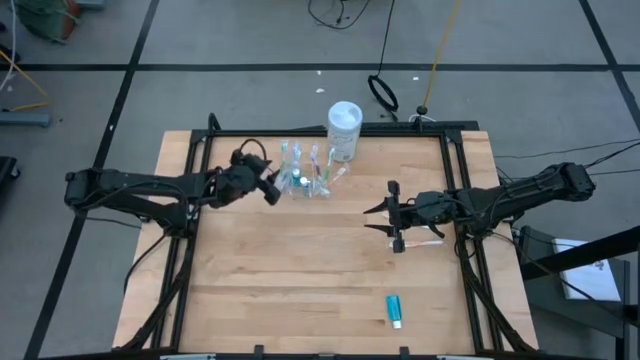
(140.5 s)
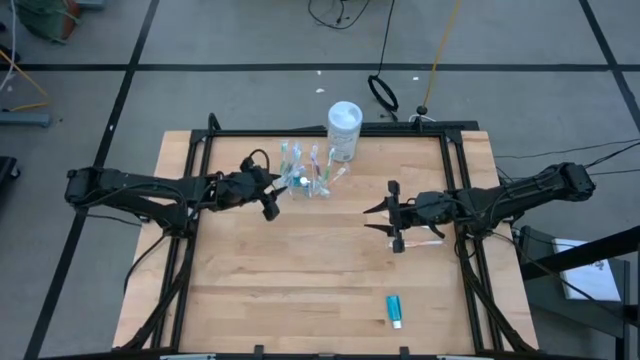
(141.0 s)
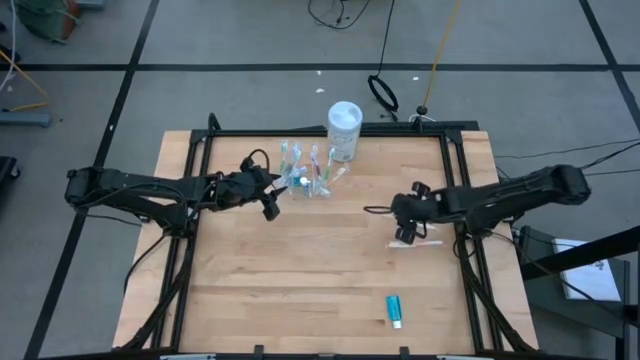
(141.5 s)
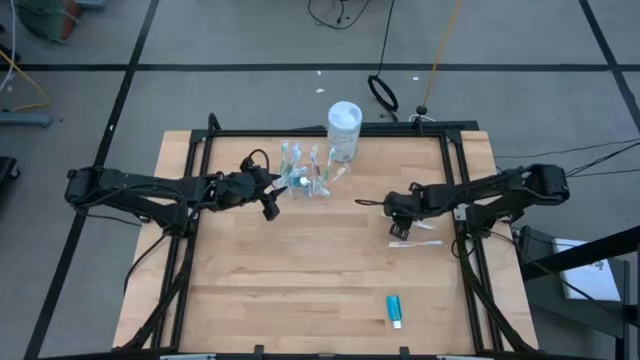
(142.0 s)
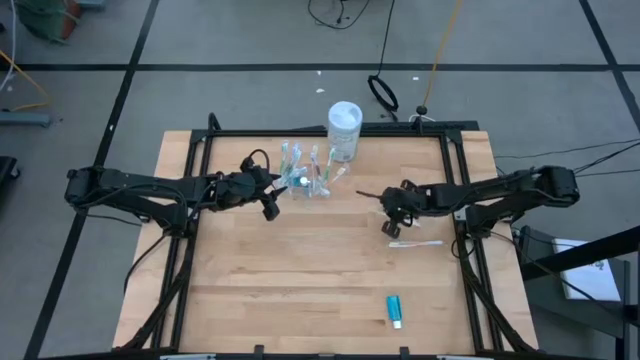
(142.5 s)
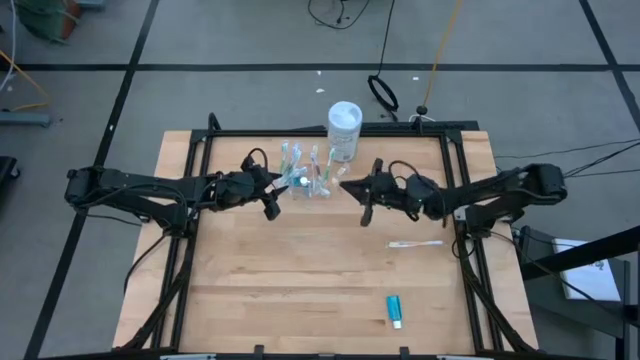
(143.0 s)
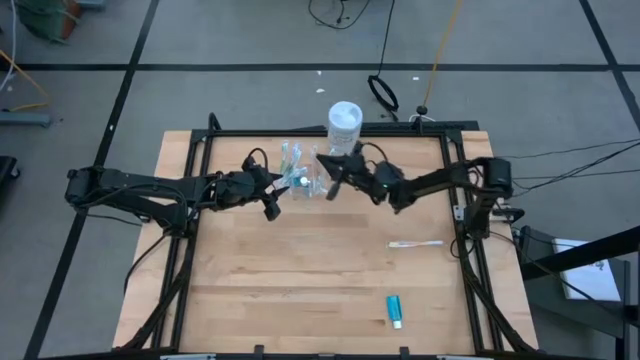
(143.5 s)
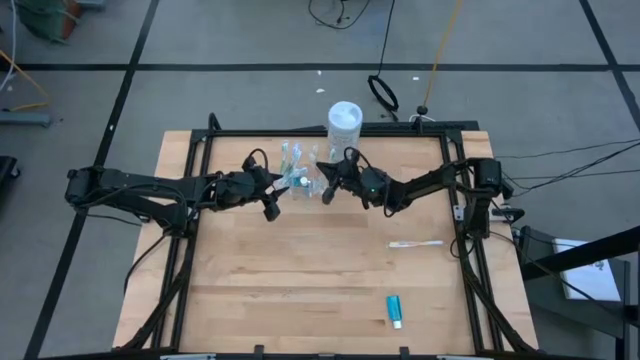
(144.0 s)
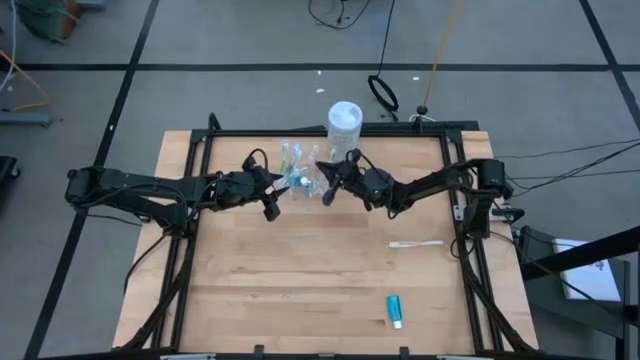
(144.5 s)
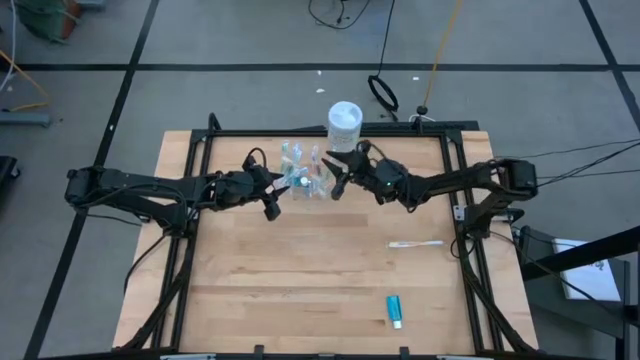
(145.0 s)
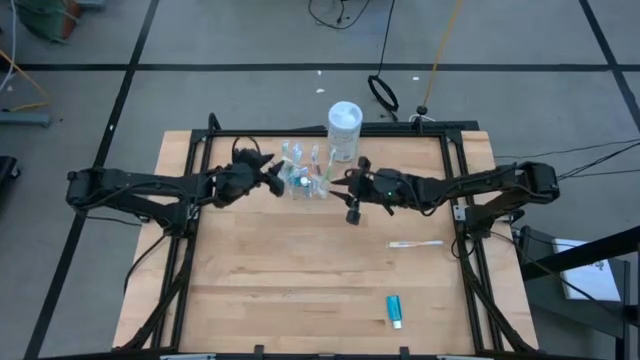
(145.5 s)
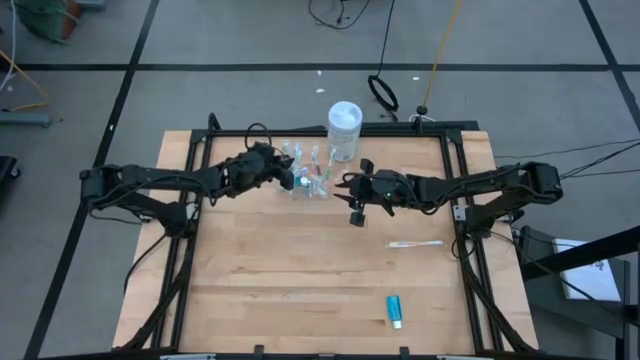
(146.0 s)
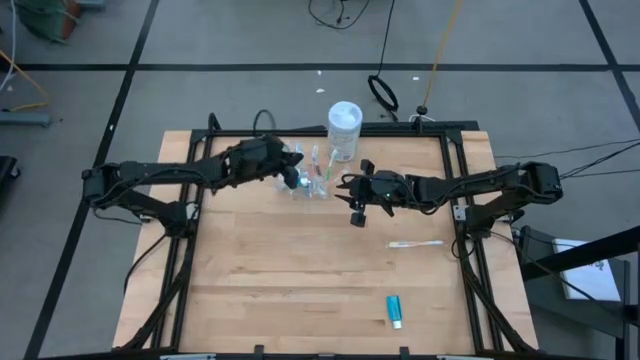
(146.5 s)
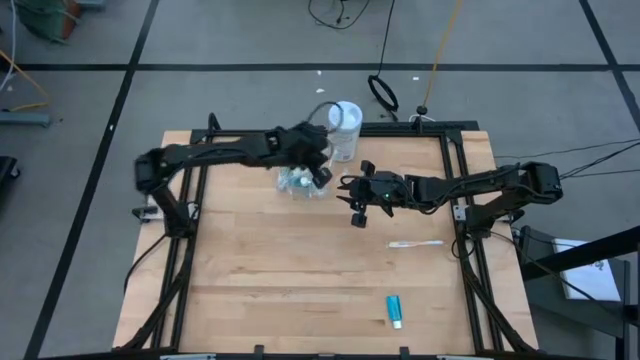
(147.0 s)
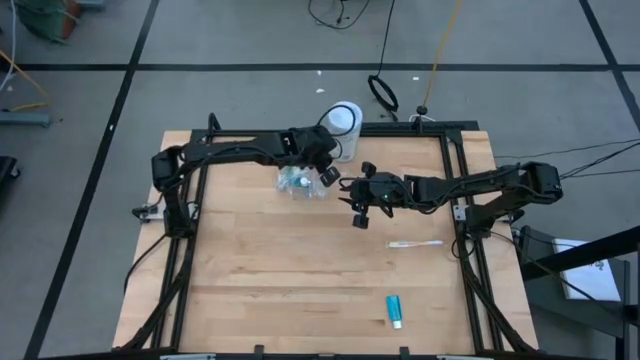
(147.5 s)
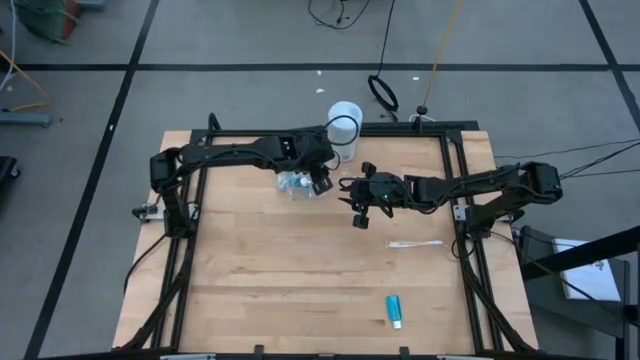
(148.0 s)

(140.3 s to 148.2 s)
Task: Pick & Place toothbrushing station
Put the orange toothbrush into the transparent organizer

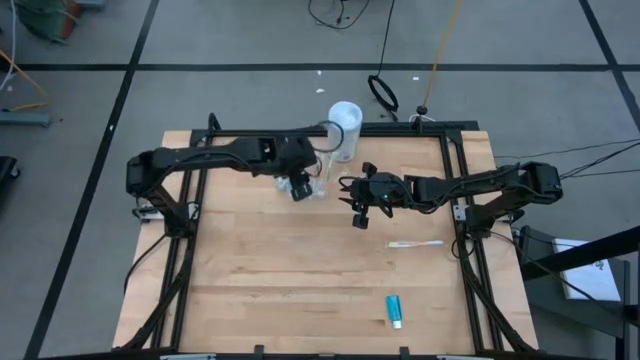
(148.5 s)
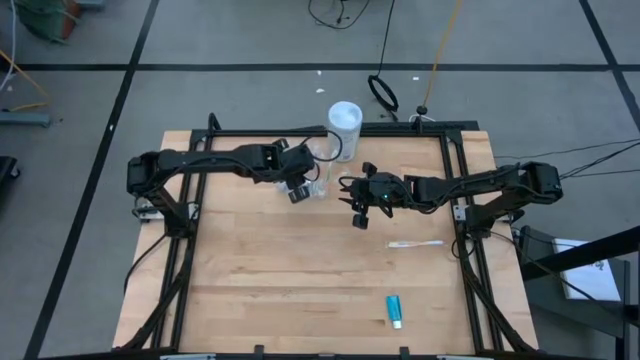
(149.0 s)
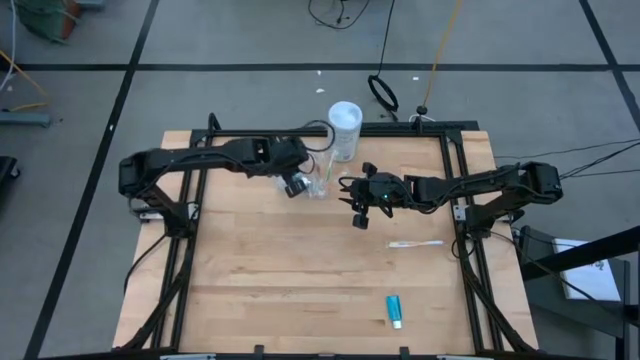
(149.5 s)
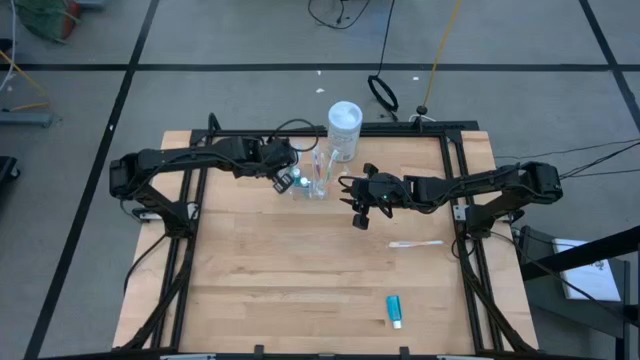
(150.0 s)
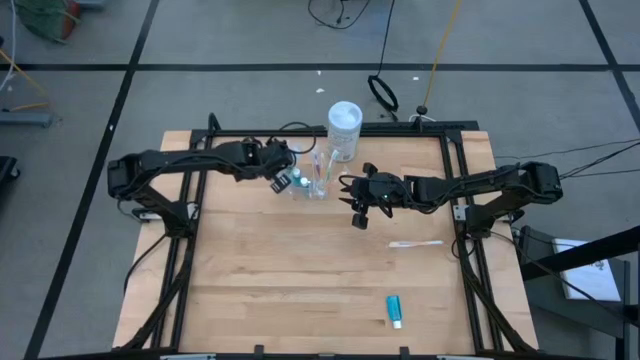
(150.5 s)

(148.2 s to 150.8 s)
Adjust the blue toothbrush in the transparent organizer

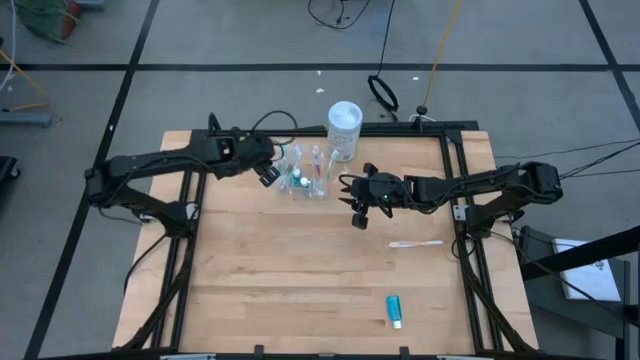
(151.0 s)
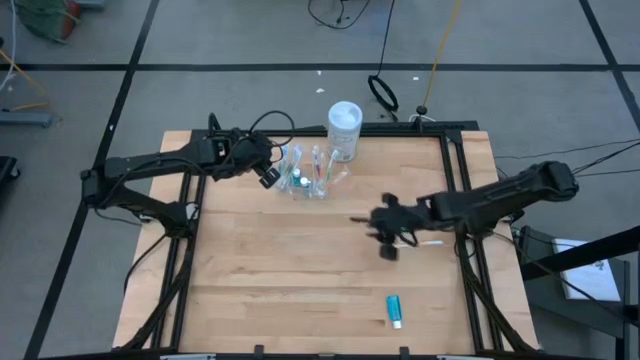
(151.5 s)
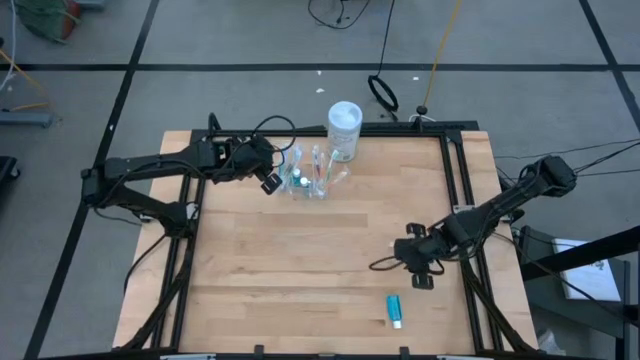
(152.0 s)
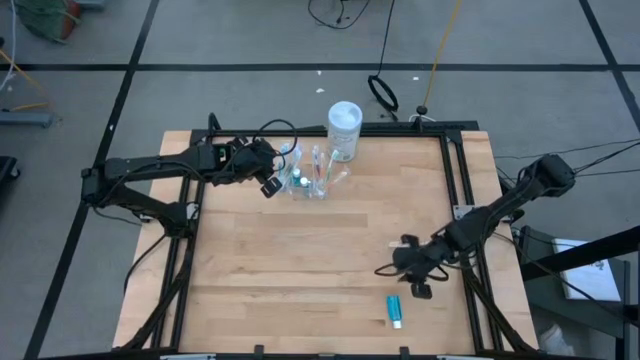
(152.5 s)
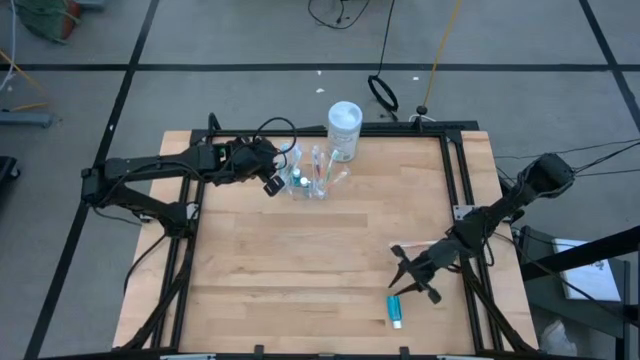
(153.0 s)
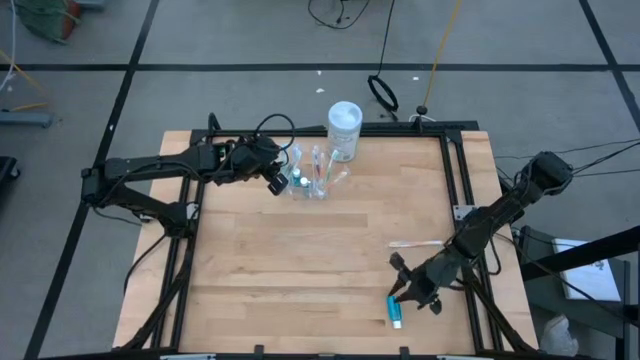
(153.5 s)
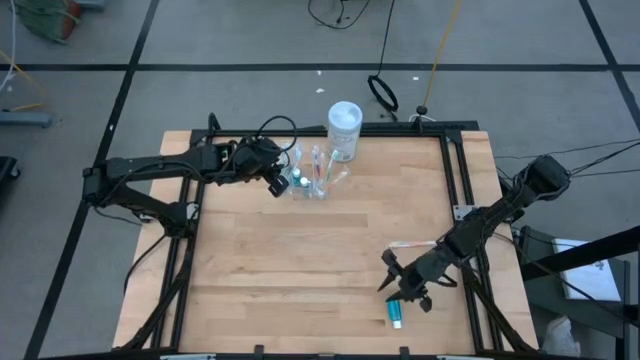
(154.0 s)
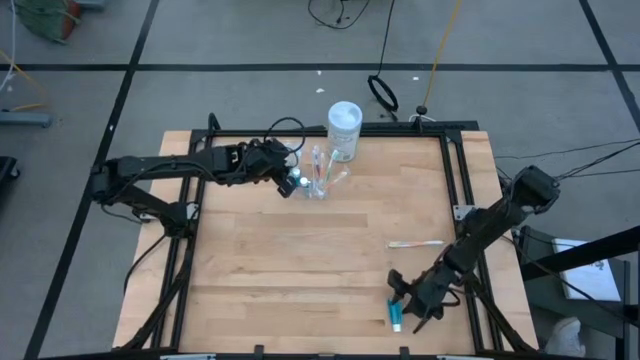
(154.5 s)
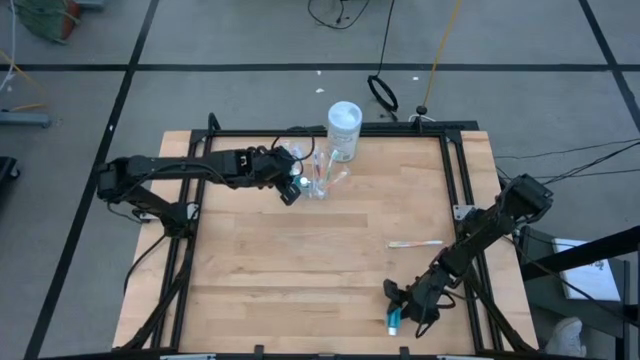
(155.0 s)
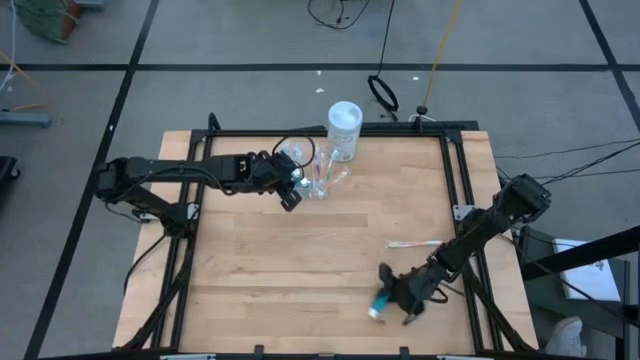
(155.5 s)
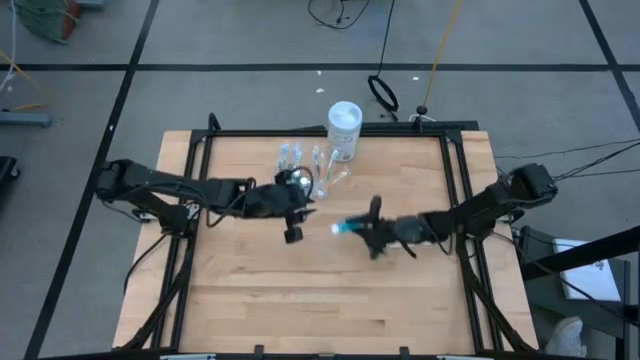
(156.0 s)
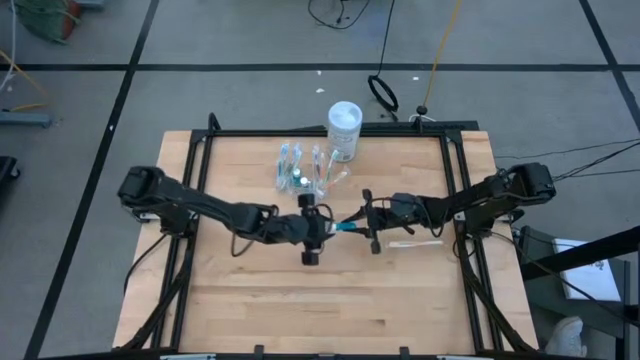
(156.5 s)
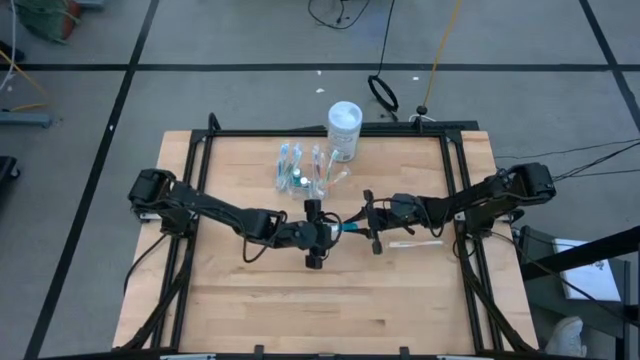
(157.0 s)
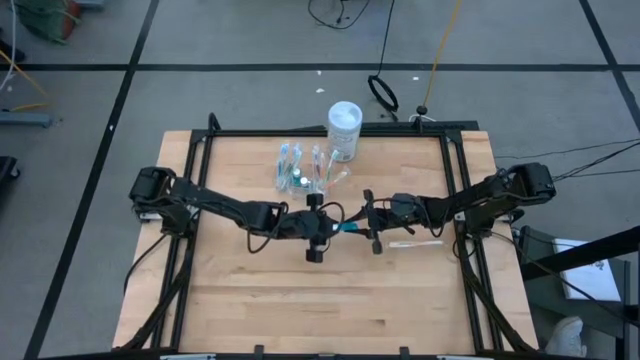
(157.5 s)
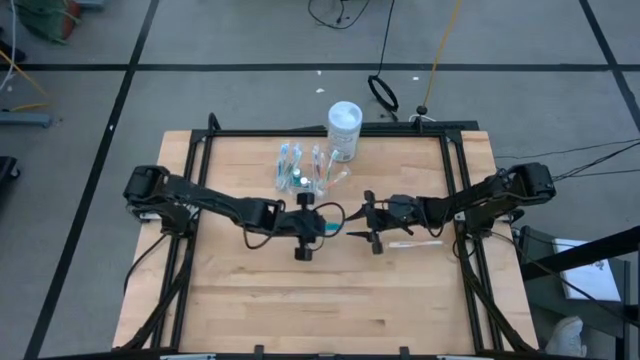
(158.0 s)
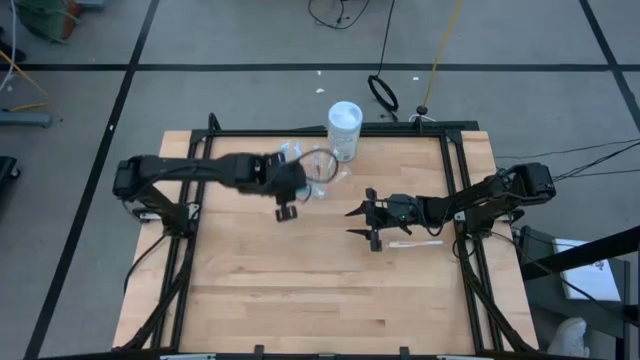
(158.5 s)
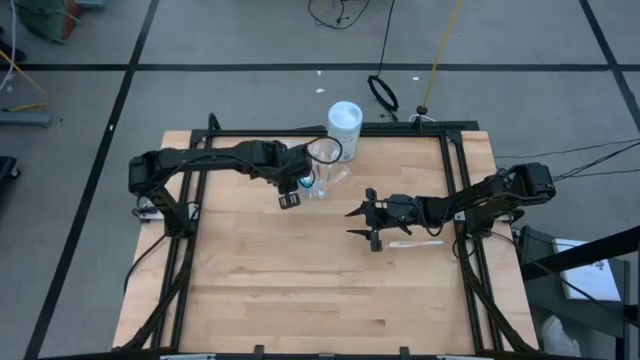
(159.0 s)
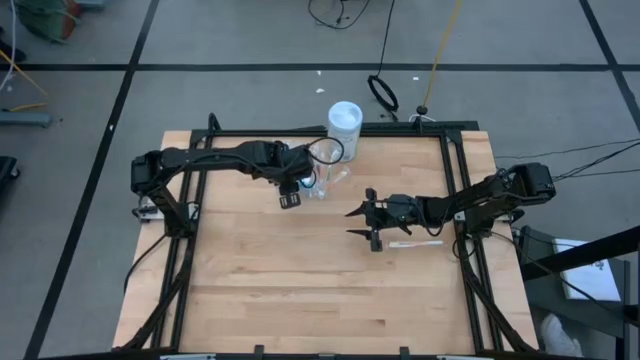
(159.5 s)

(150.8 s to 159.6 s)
Put the blue mouthwash into the transparent organizer

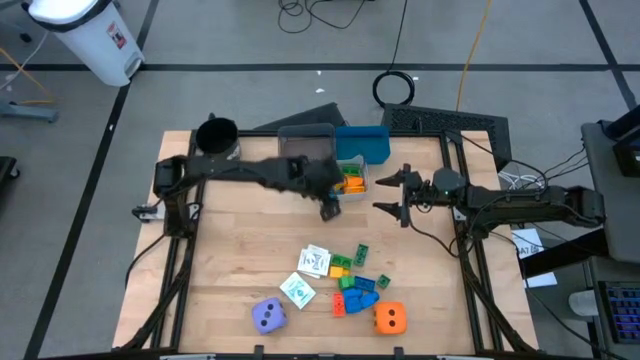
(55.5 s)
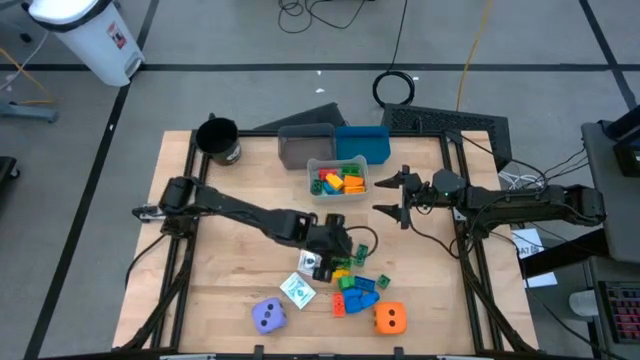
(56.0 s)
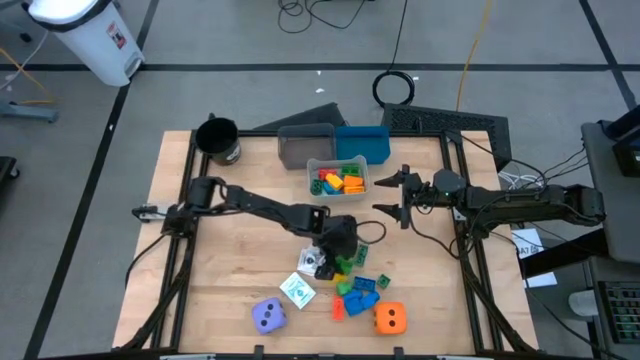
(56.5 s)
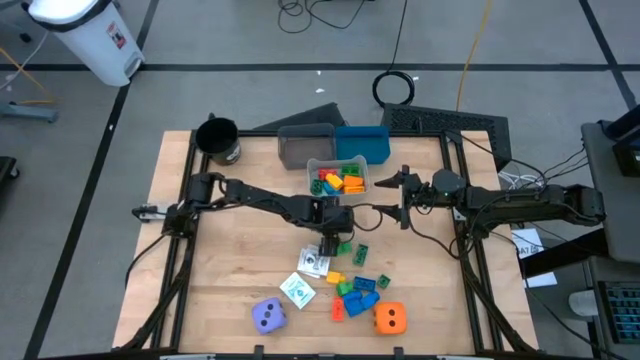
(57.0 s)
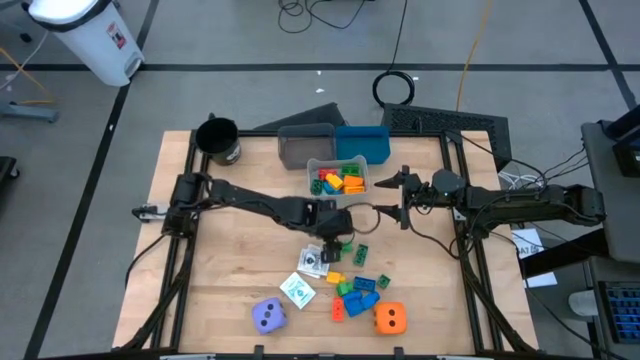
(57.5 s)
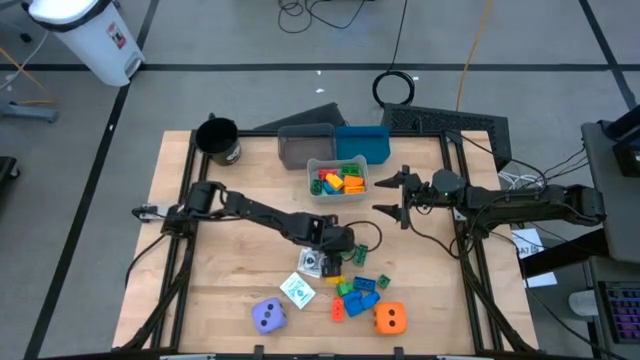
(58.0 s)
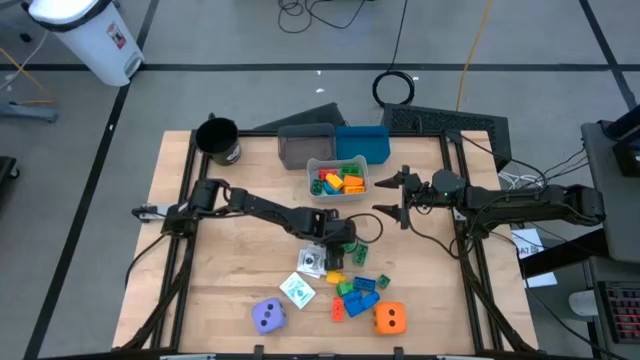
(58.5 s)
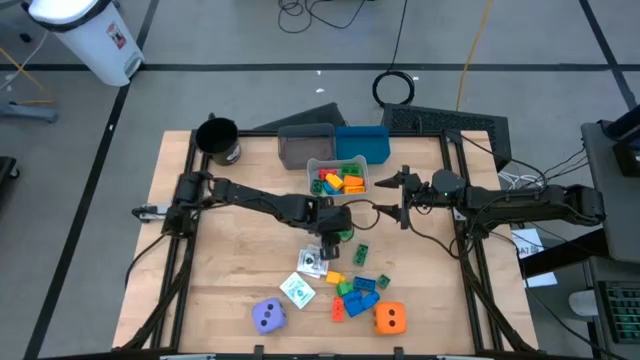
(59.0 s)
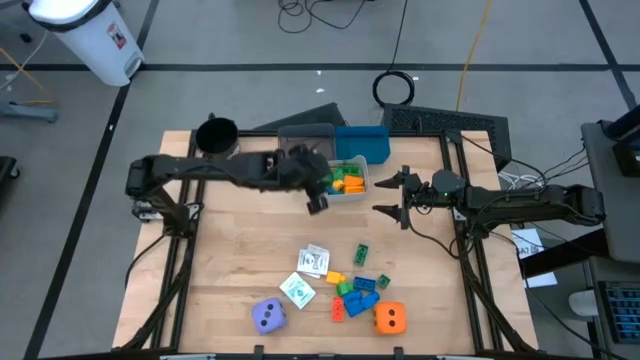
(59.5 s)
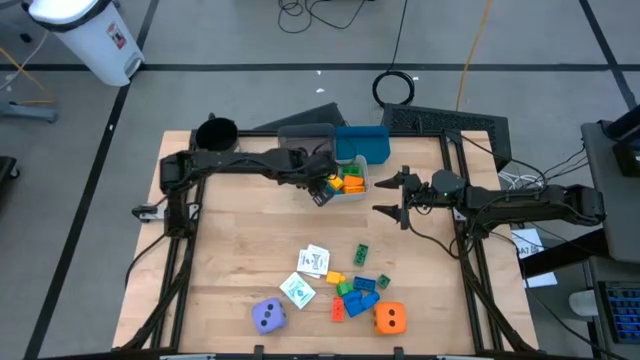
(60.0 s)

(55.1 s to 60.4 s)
Task: Pick & Place Toys
Put the green game piece into the gray bin
